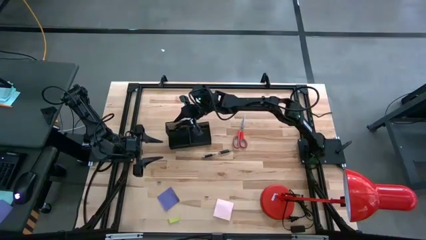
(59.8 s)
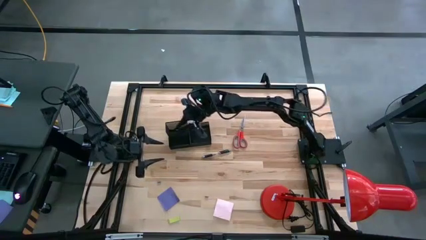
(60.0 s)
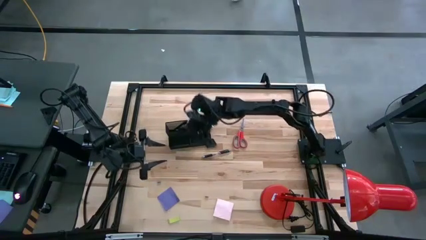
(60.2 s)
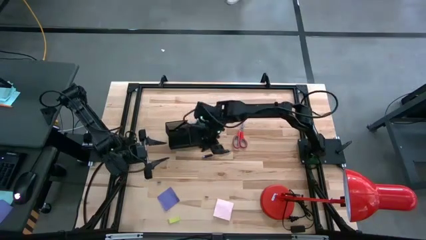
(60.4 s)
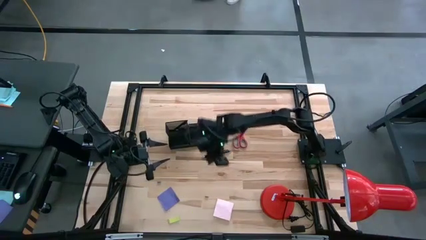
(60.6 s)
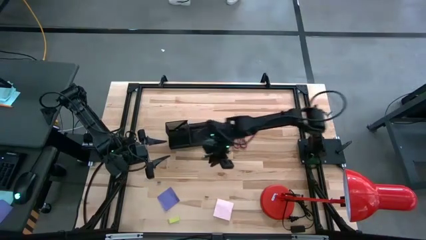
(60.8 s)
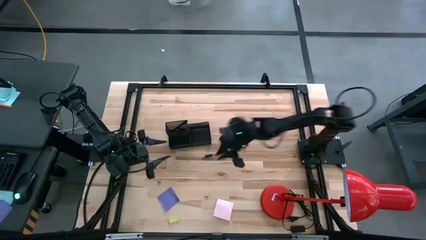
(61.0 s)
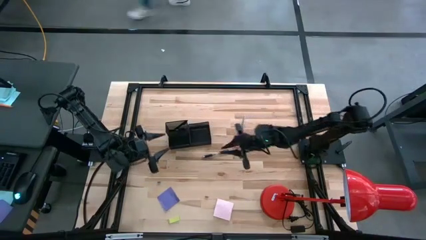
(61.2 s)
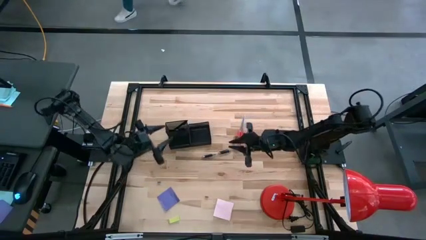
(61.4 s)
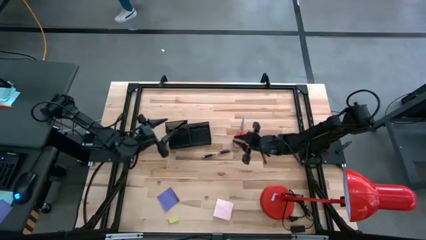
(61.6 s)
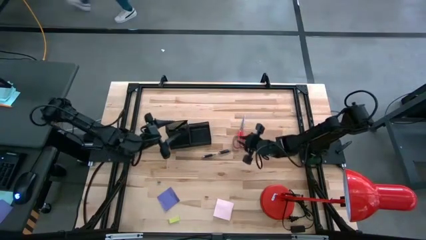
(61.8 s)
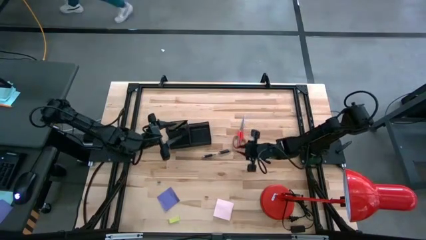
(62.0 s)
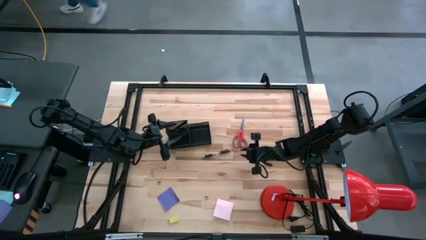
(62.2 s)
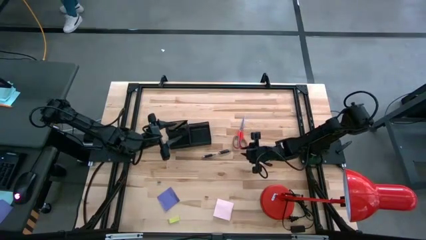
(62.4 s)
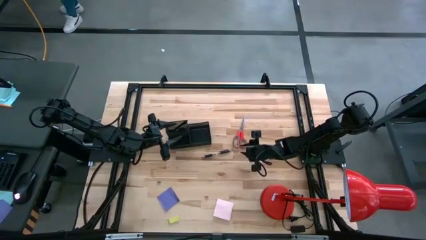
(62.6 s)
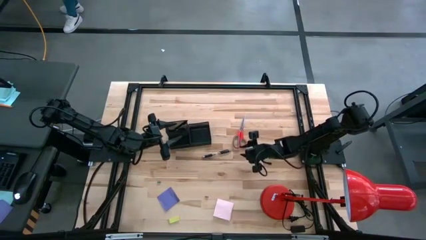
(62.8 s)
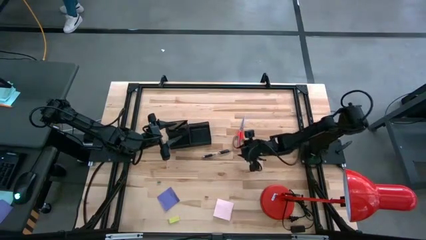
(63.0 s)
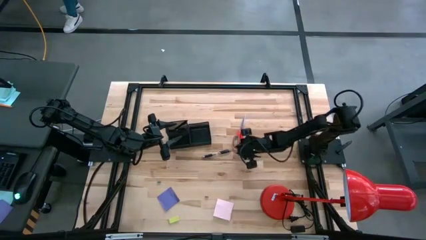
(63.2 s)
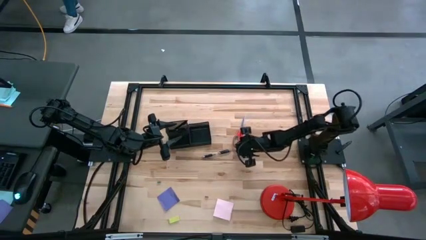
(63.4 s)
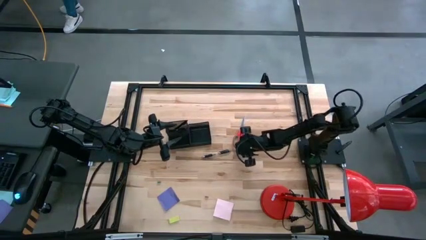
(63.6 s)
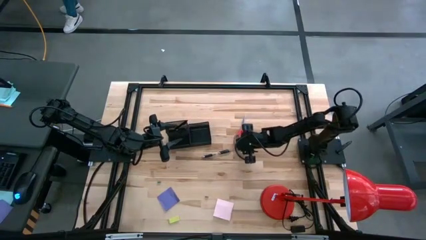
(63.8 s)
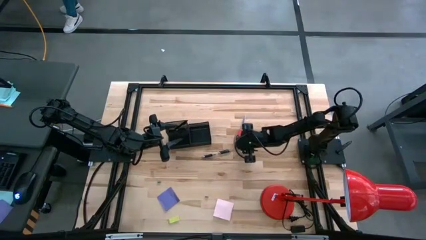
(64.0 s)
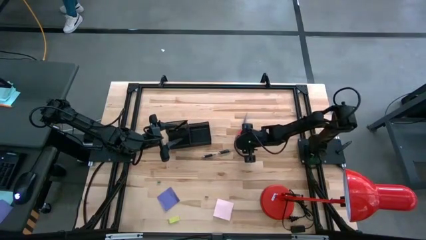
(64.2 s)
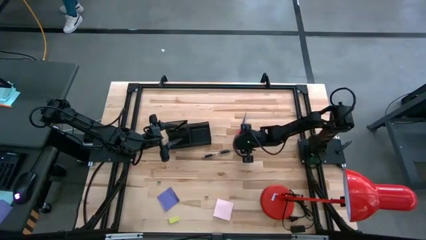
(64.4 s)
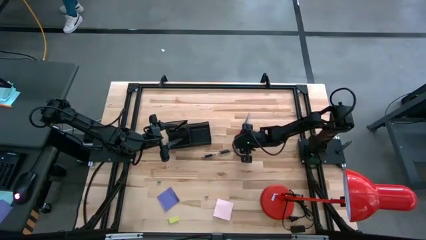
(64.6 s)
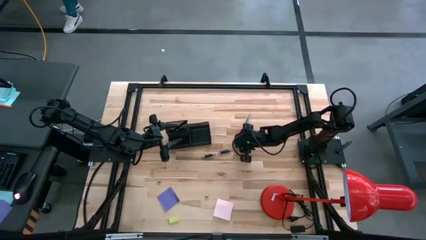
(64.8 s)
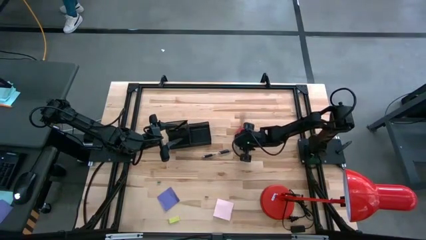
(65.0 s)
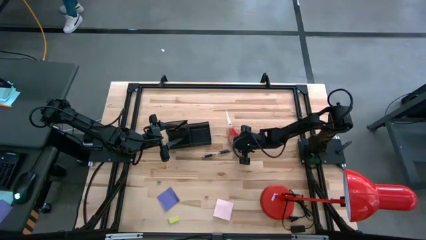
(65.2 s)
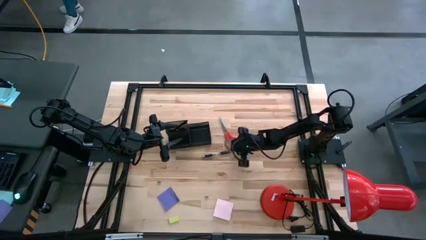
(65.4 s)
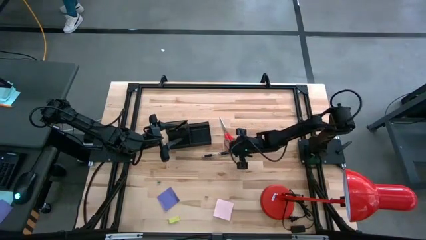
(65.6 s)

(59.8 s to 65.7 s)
Task: Pick and place office supplies into organizer
Put the scissors into the desk organizer

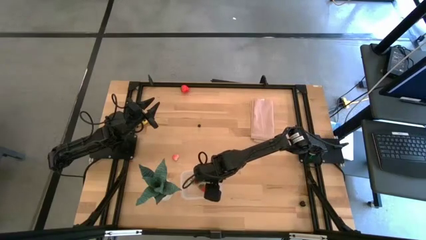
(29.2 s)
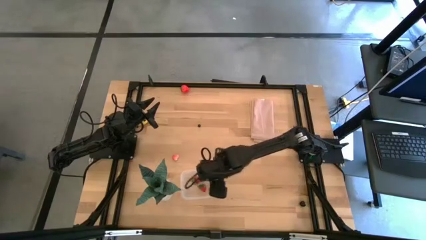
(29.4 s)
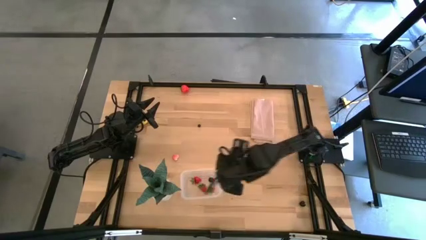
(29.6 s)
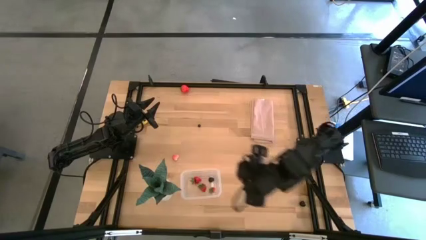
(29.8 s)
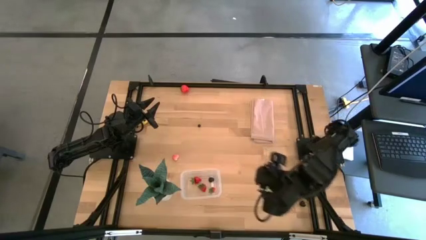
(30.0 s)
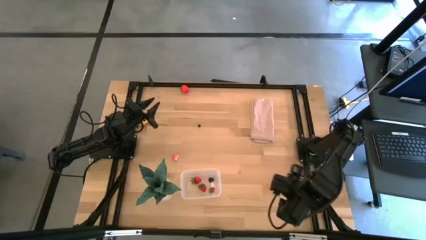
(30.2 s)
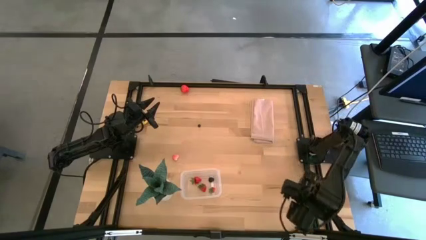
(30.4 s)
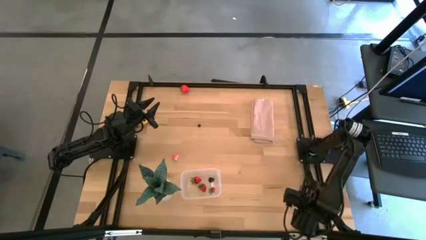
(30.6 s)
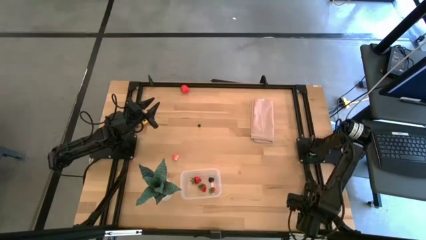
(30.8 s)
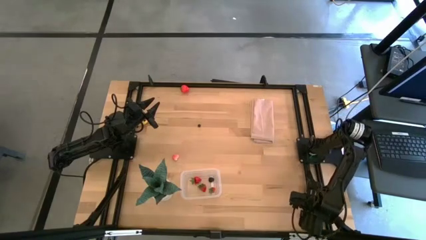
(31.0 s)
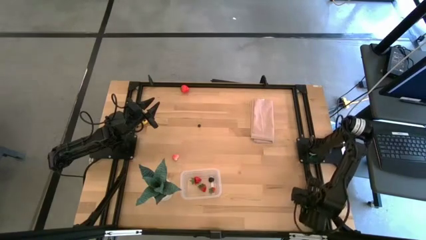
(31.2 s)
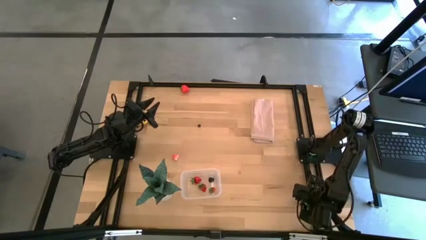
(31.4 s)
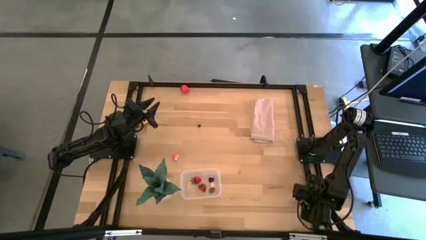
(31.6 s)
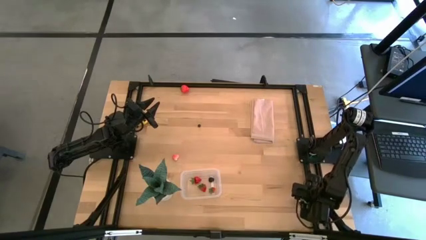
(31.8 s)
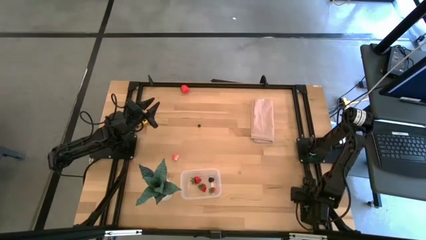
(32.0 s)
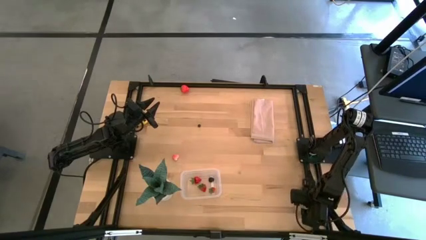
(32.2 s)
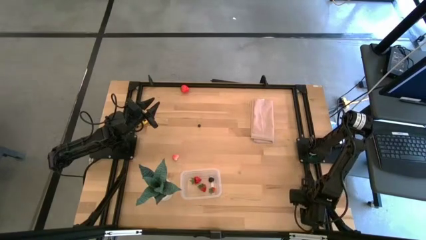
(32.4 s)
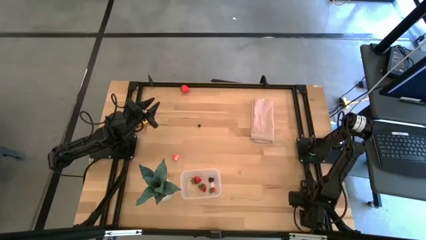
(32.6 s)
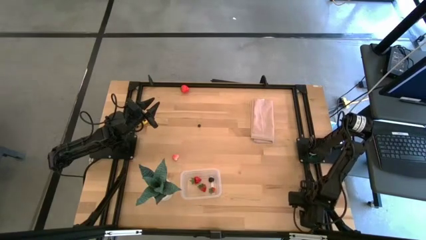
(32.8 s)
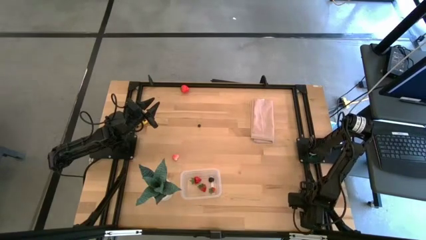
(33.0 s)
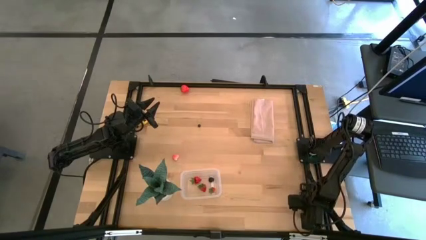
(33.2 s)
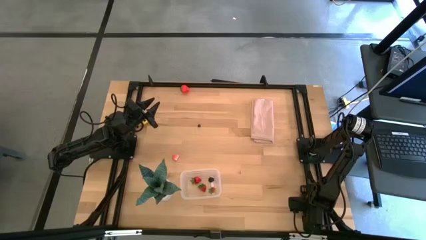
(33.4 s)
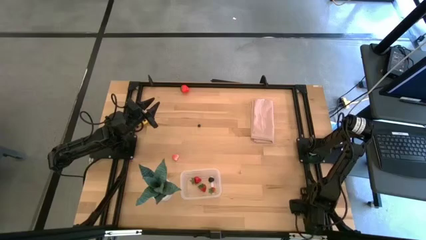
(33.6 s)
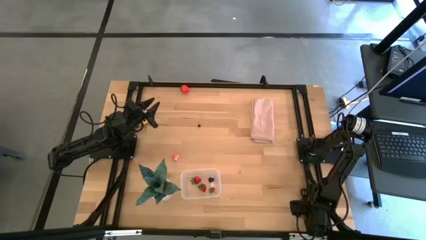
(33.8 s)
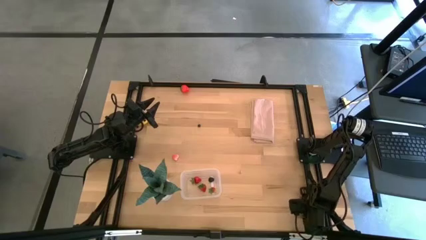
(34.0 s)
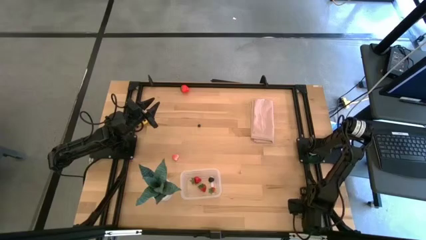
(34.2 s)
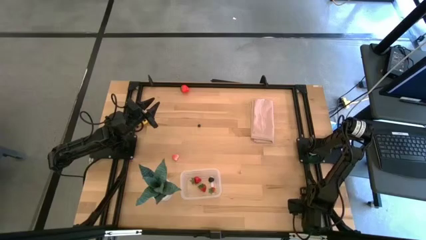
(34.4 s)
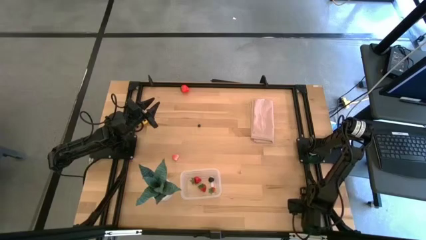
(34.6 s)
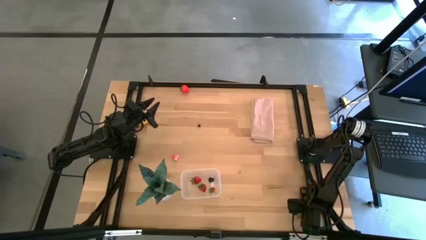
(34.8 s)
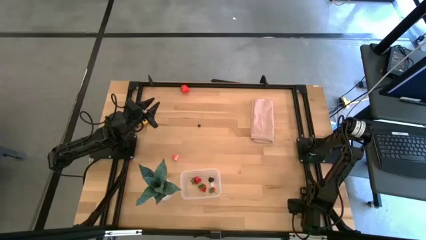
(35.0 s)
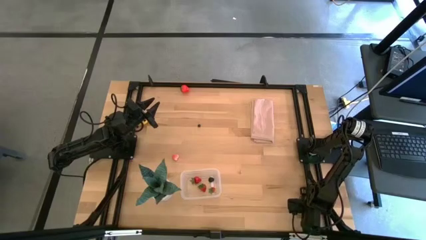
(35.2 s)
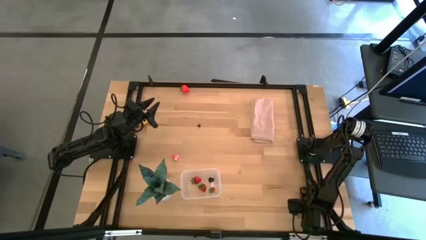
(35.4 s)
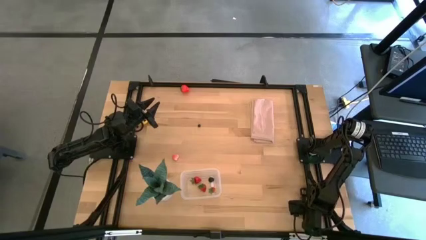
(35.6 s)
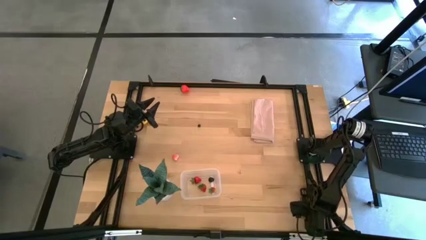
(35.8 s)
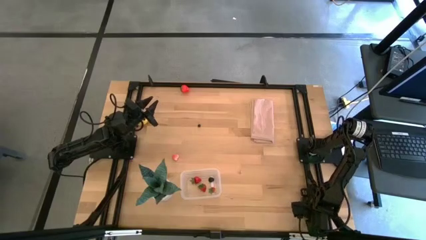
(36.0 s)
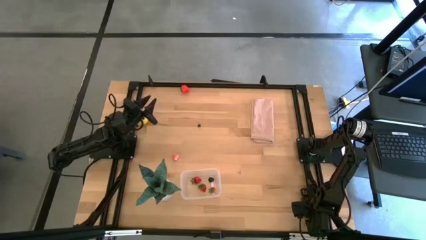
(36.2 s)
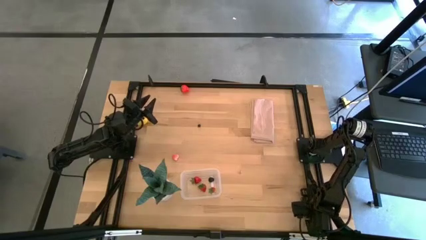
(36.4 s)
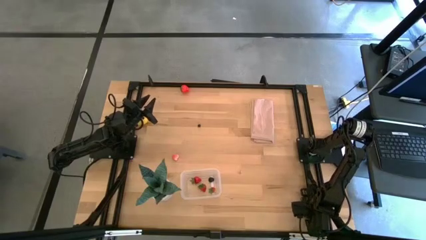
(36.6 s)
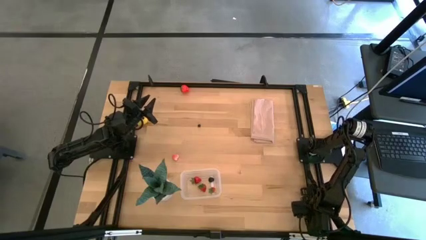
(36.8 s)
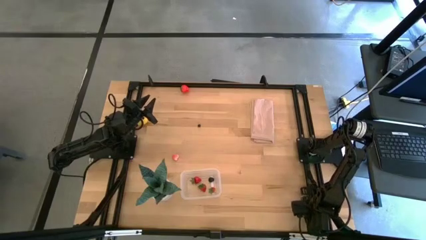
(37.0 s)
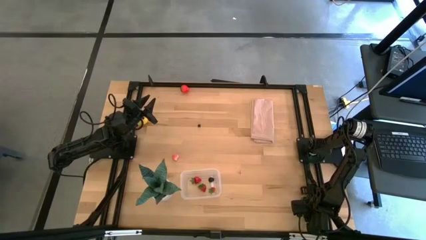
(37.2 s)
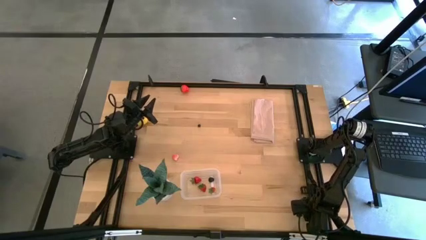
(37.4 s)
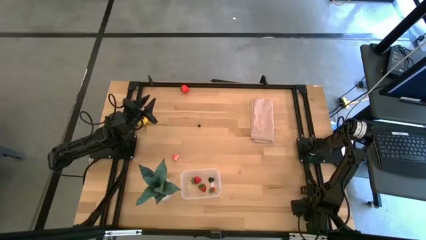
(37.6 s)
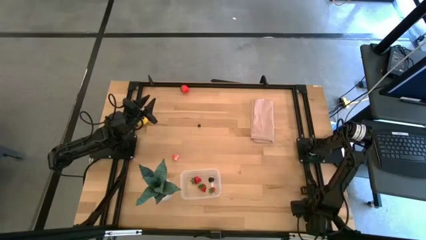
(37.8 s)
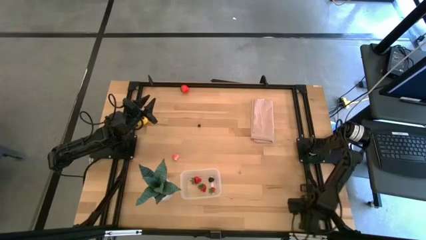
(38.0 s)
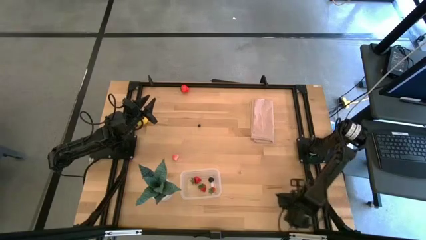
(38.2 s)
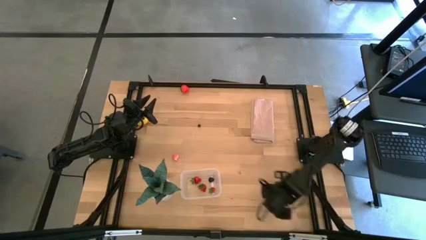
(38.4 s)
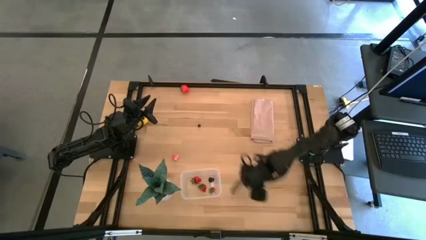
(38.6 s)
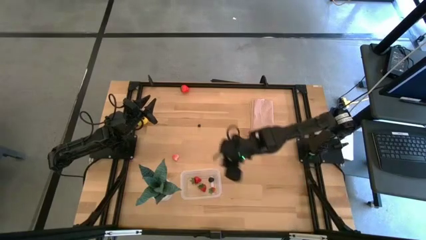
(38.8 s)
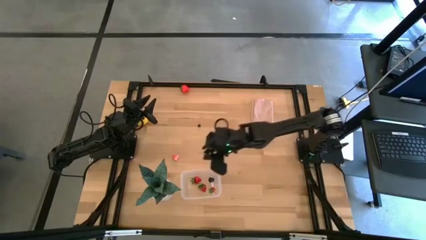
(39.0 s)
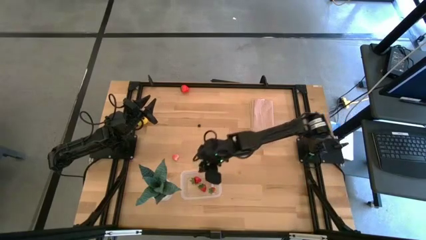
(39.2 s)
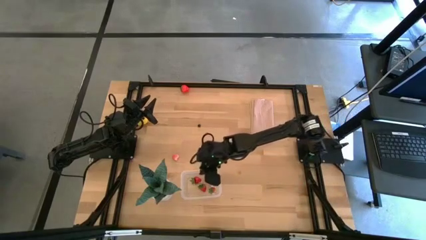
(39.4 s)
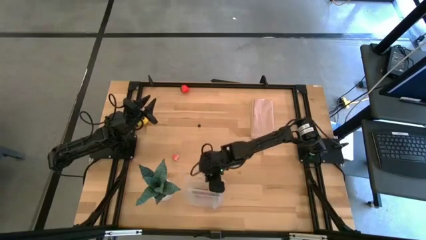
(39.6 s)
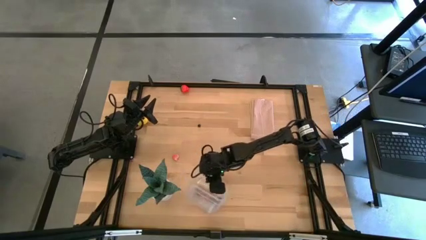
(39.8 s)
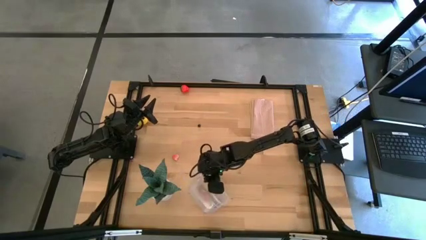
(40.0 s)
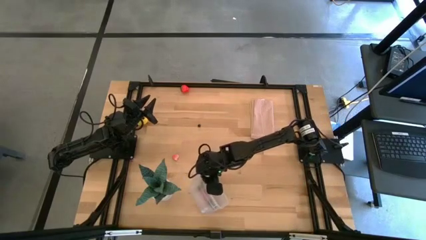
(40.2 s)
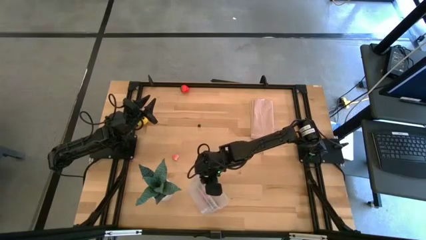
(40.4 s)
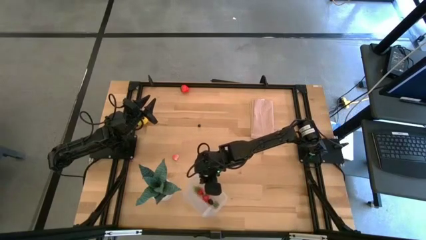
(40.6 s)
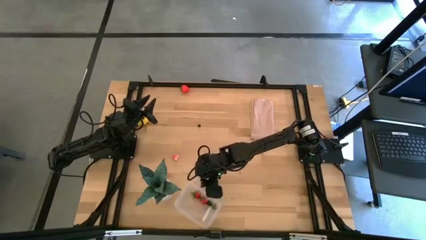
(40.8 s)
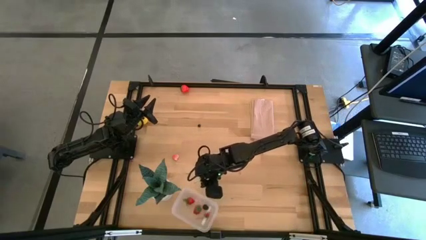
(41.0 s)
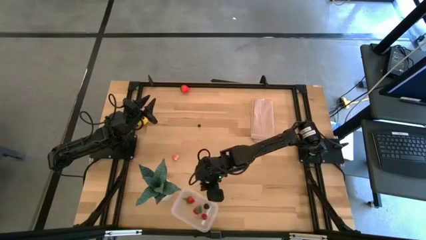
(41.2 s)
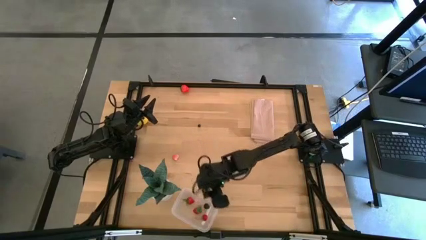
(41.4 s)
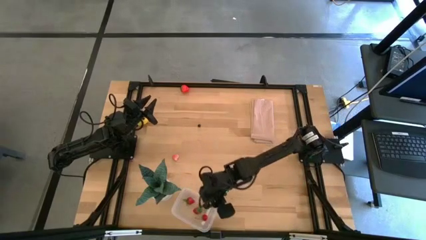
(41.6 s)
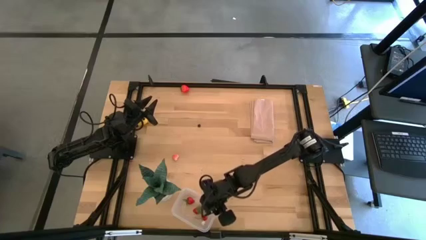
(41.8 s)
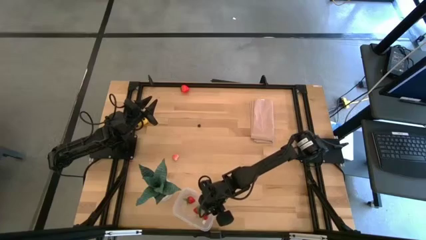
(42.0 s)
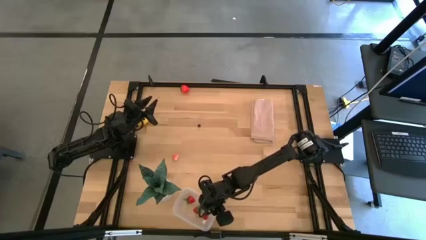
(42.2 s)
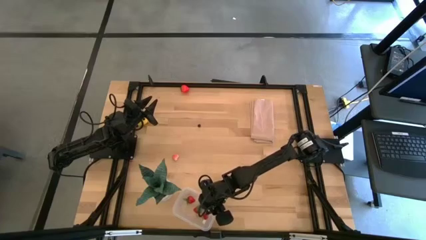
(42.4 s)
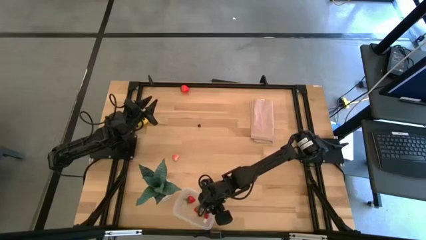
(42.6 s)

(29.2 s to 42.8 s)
Task: Pick and placing Produce into tupperware
Put the black cherry into the transparent bin
